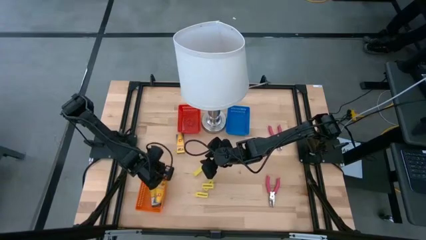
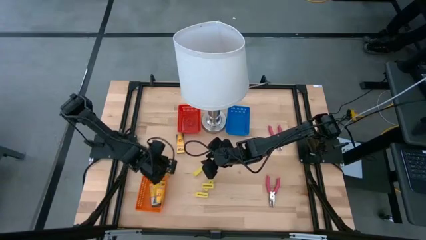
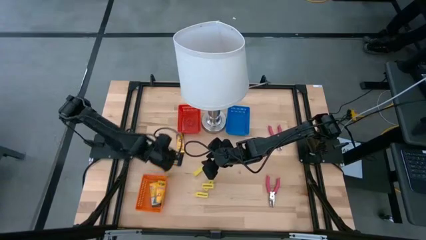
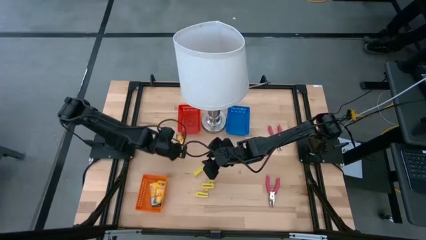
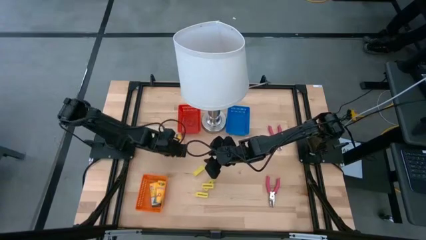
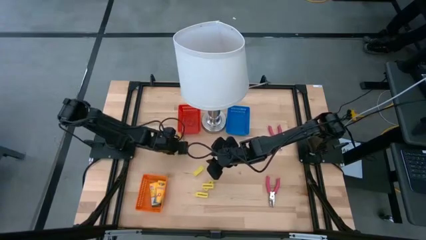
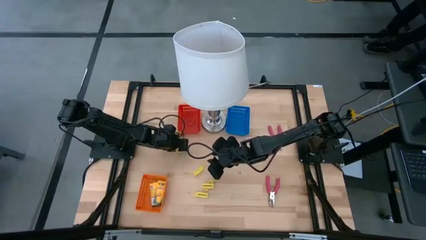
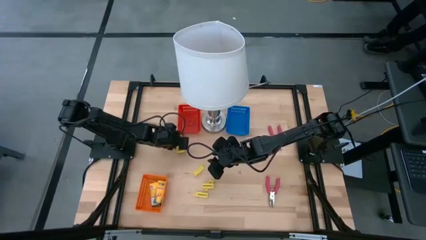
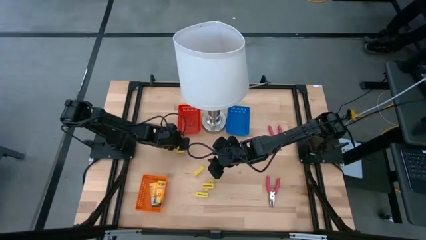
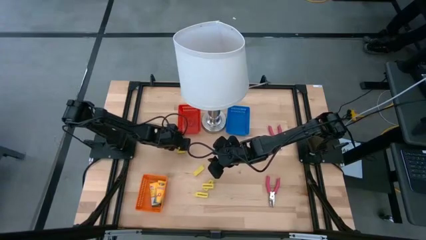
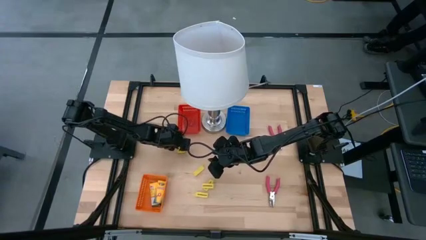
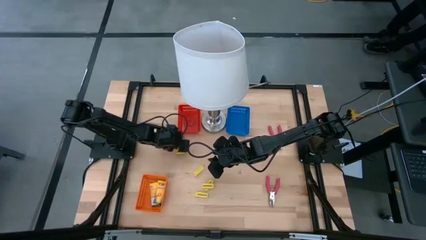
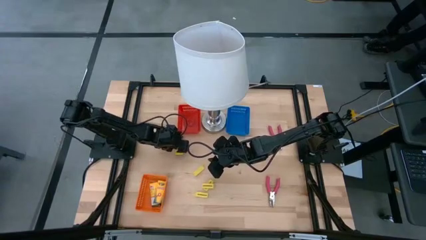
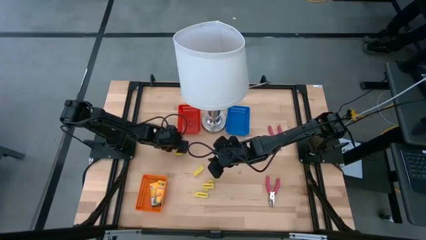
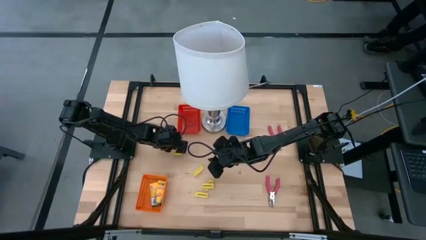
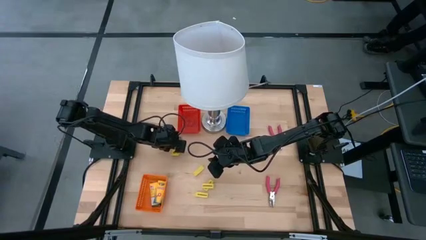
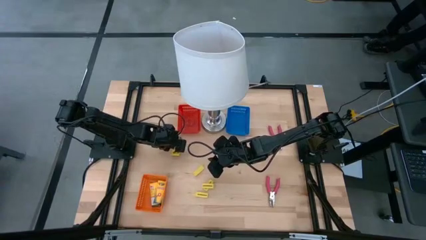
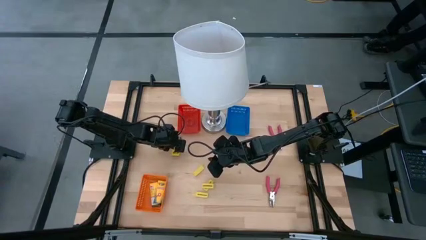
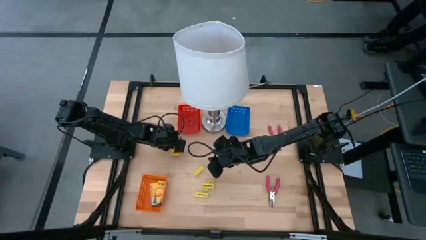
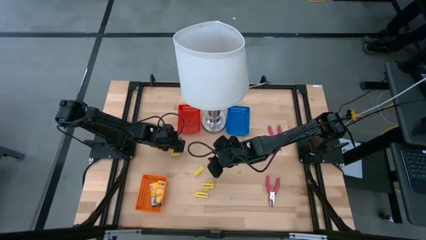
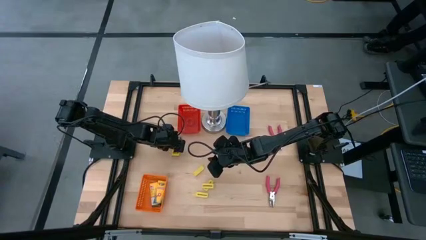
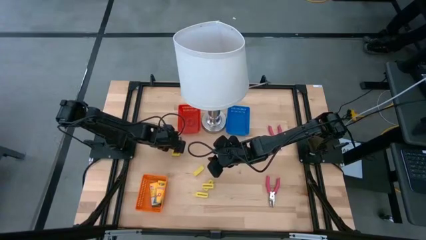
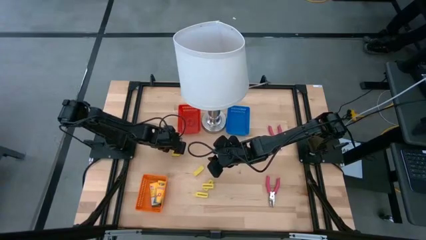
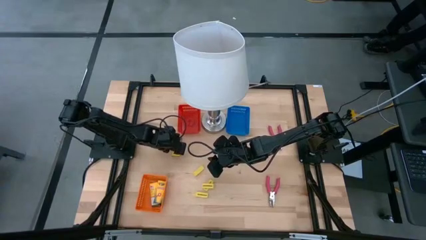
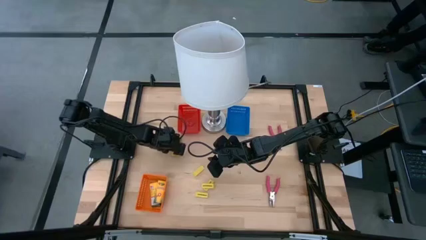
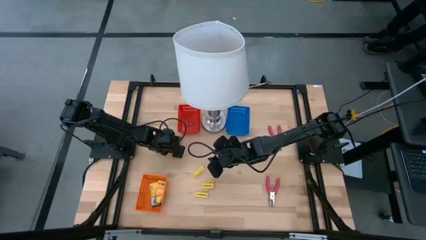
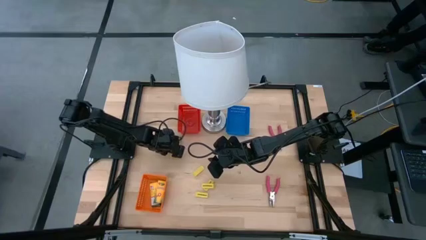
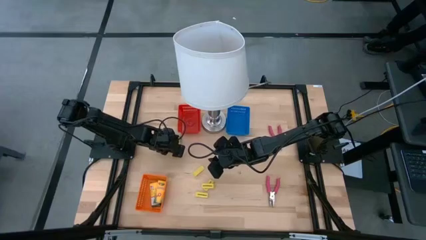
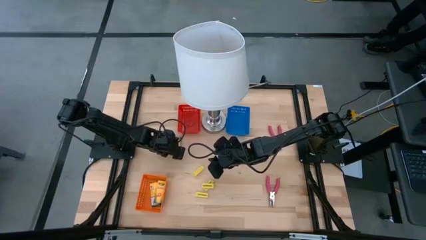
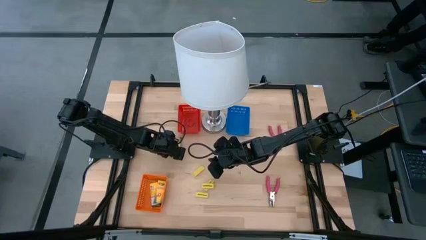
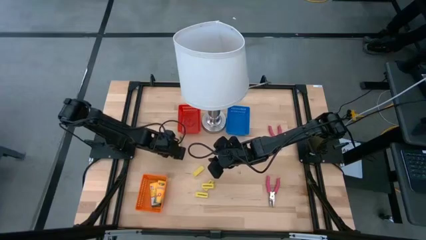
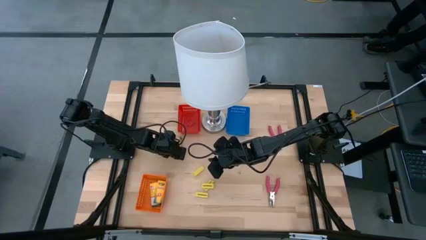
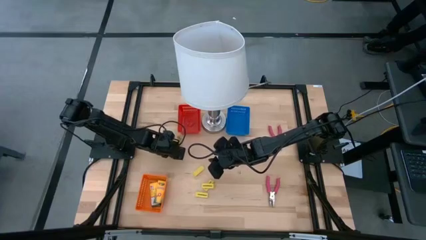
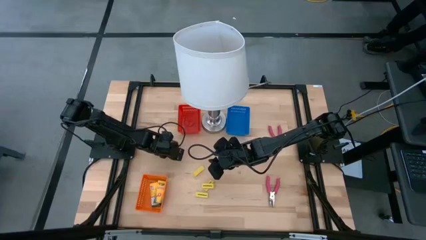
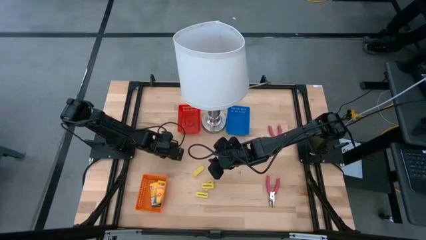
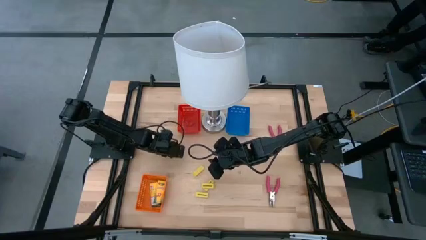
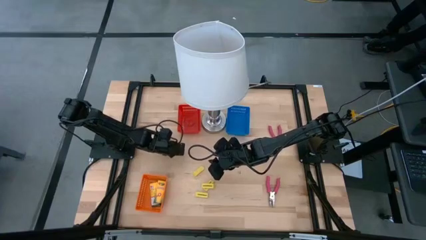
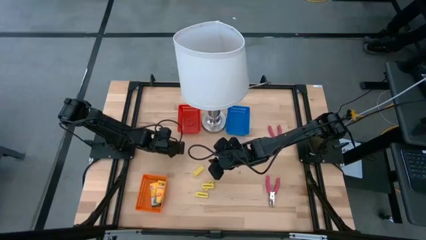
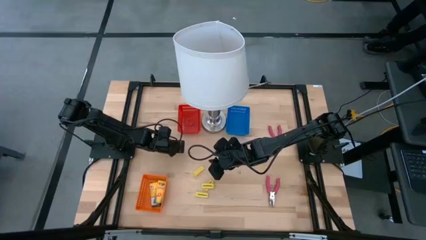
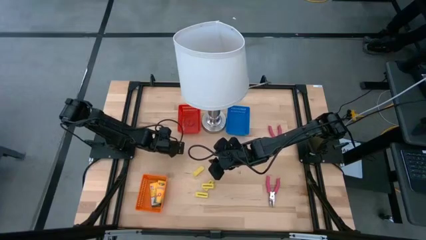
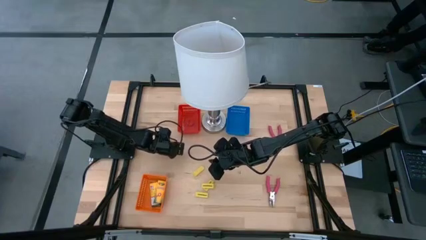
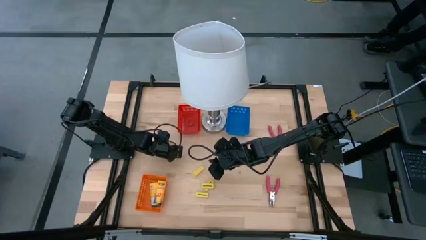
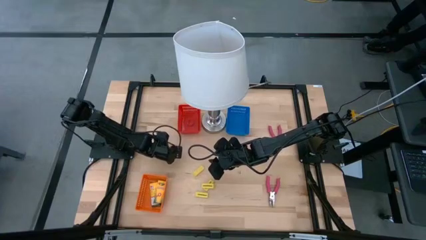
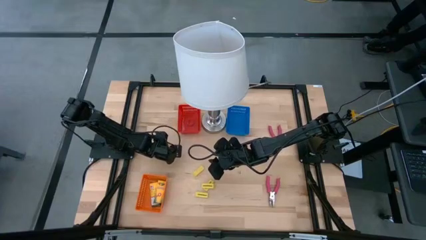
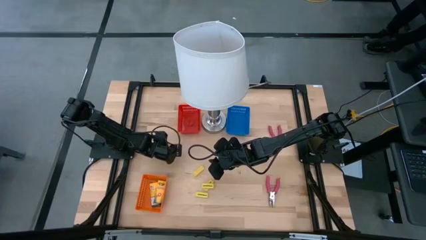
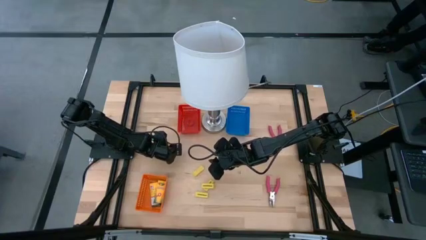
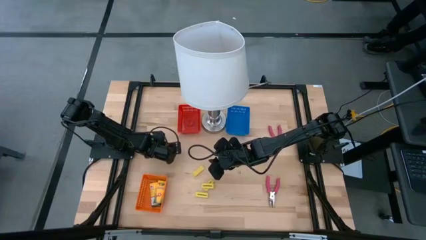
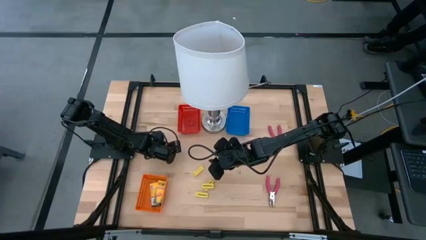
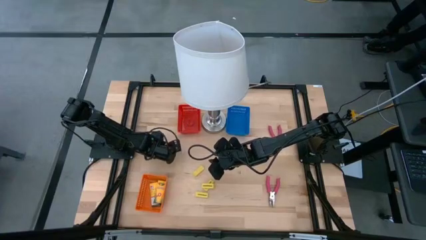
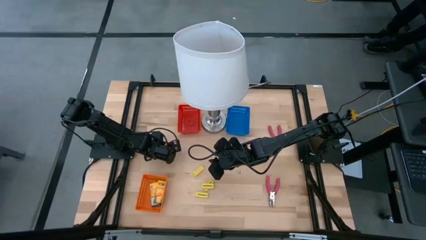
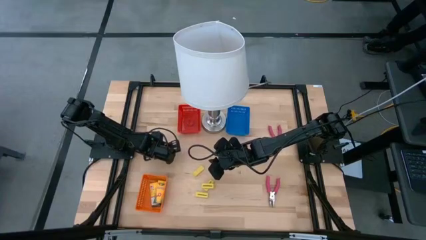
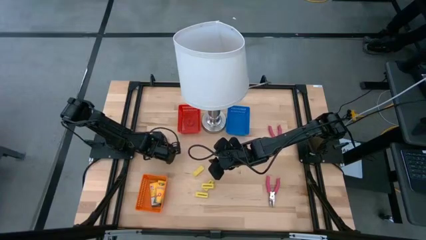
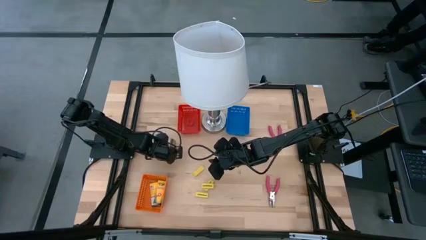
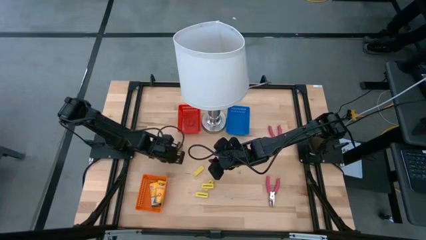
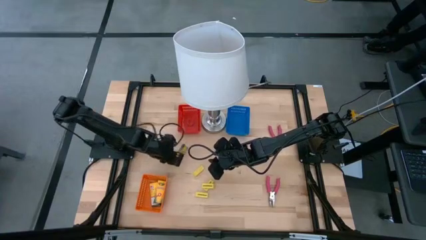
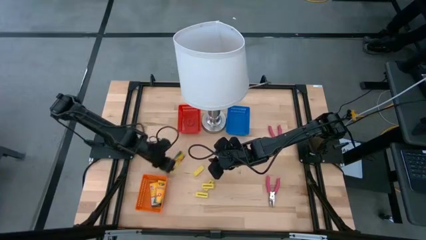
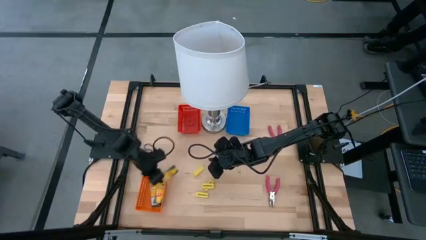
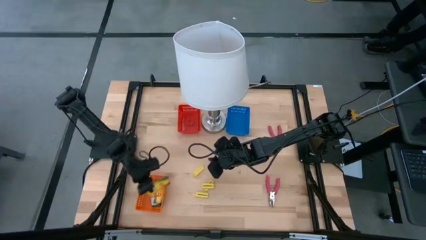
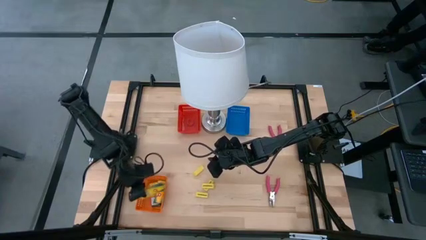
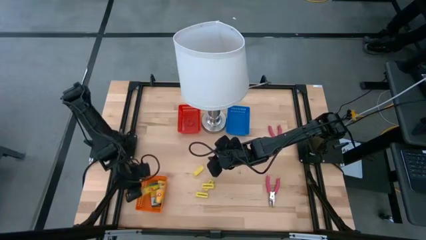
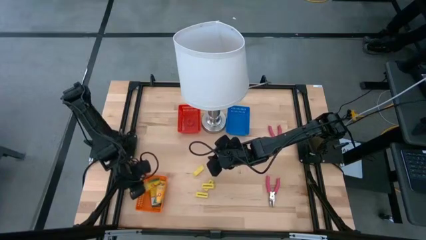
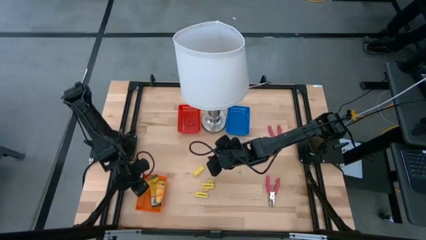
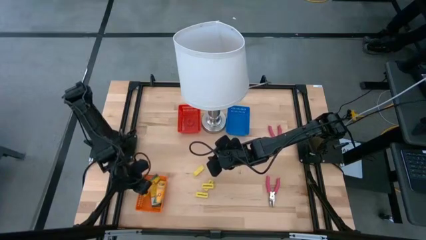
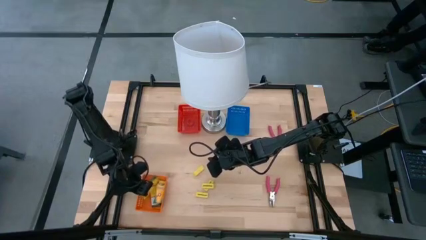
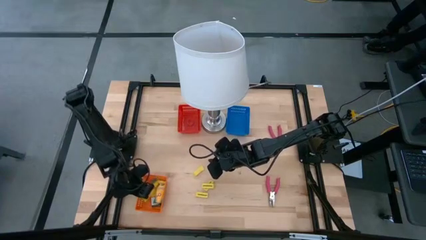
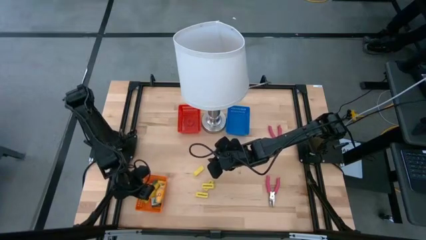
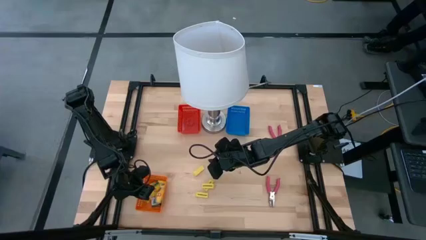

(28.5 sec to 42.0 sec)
Task: Pick & Place School Supplies
Put the yellow crayon box into the orange basket
